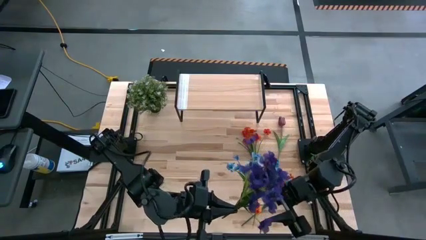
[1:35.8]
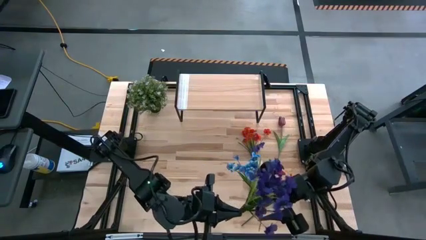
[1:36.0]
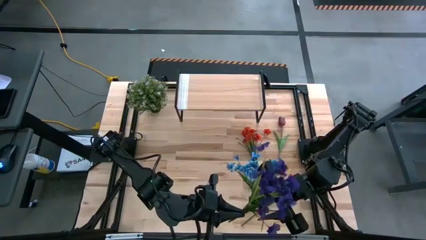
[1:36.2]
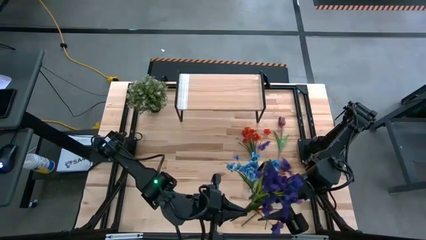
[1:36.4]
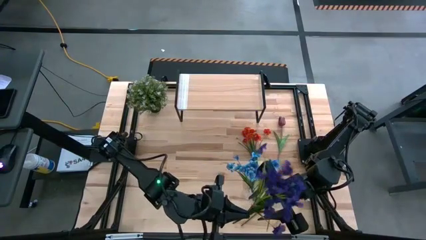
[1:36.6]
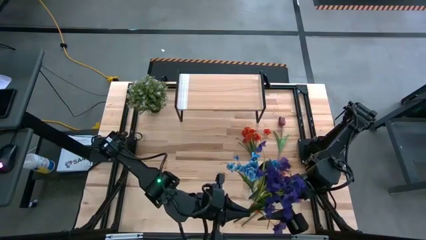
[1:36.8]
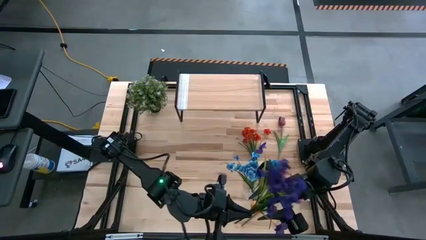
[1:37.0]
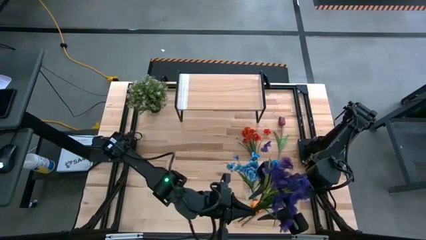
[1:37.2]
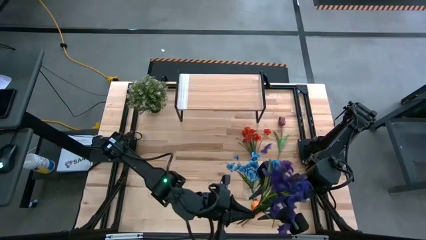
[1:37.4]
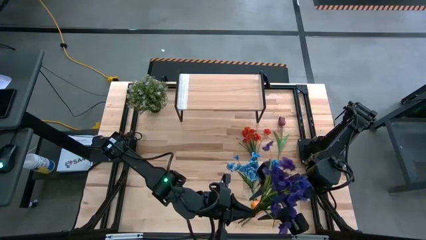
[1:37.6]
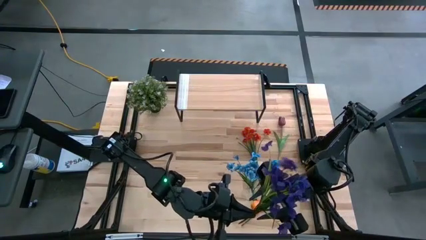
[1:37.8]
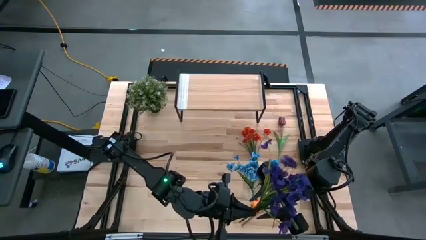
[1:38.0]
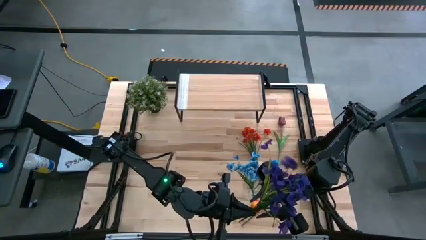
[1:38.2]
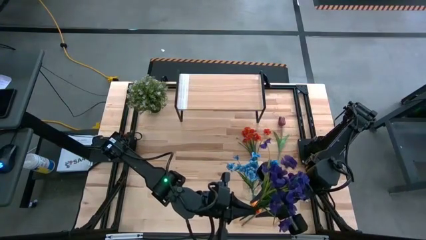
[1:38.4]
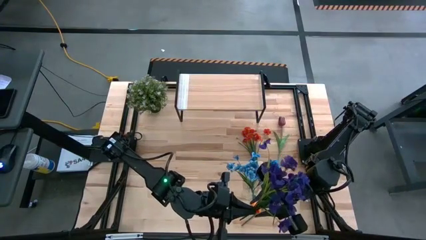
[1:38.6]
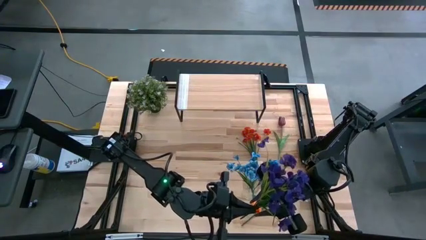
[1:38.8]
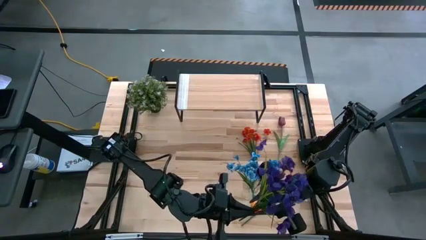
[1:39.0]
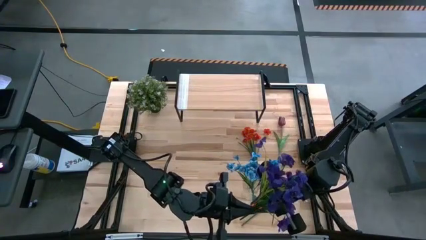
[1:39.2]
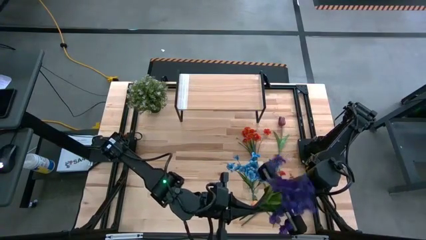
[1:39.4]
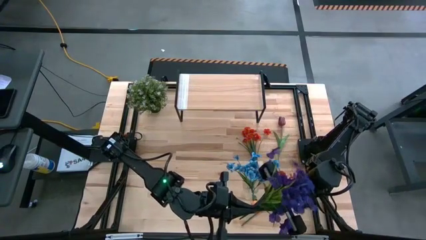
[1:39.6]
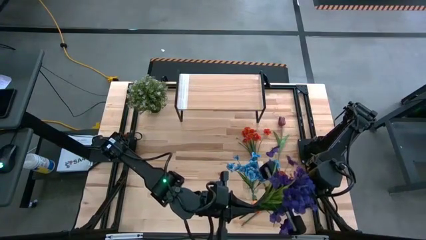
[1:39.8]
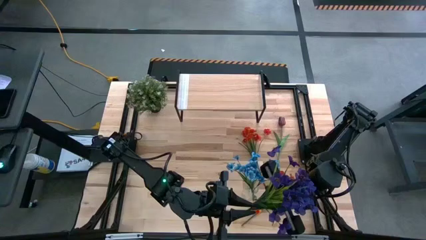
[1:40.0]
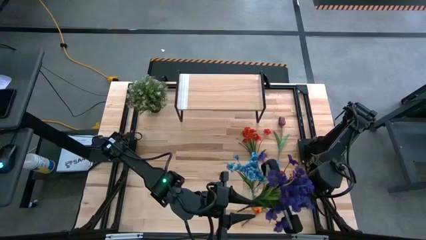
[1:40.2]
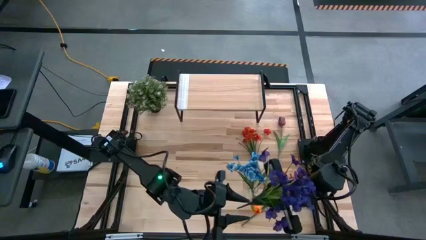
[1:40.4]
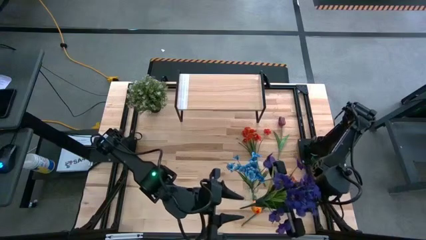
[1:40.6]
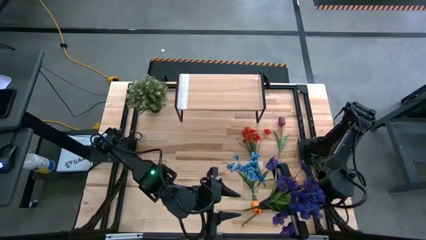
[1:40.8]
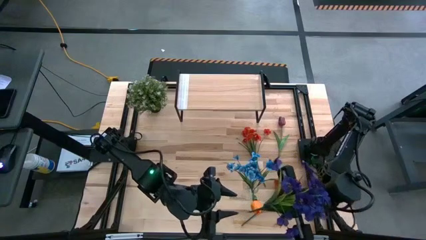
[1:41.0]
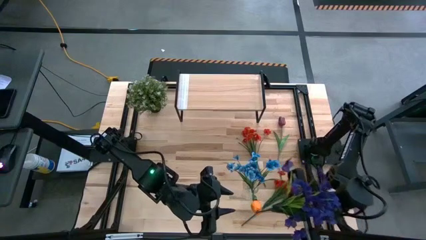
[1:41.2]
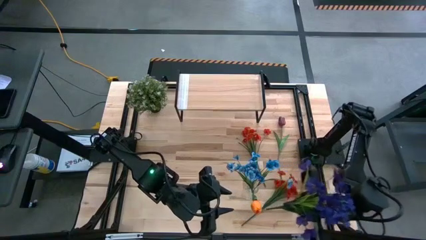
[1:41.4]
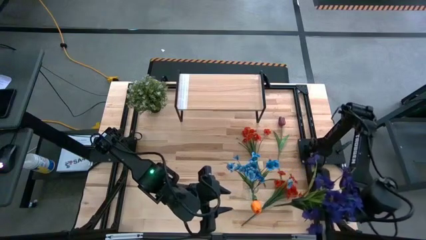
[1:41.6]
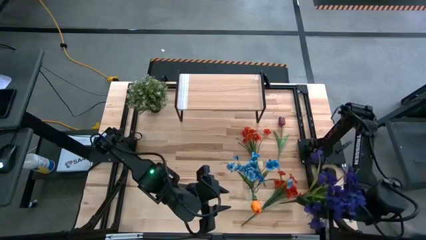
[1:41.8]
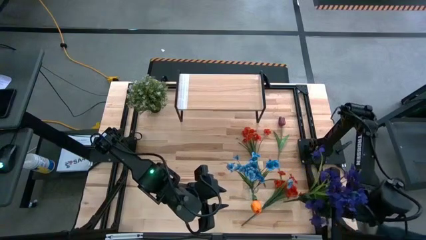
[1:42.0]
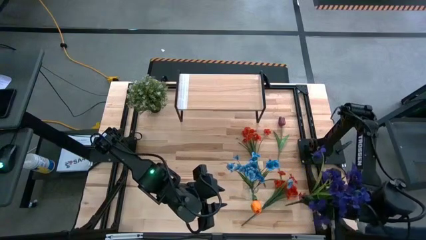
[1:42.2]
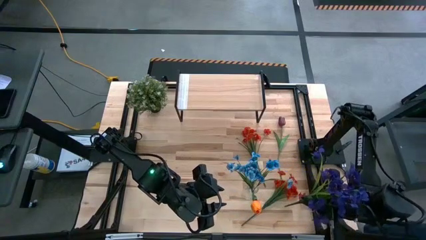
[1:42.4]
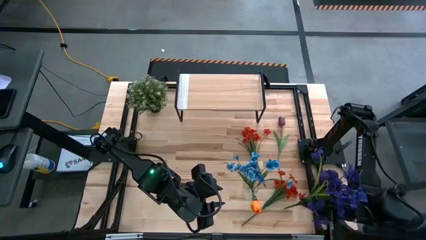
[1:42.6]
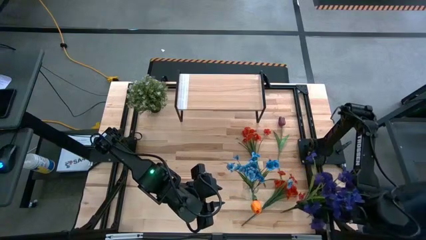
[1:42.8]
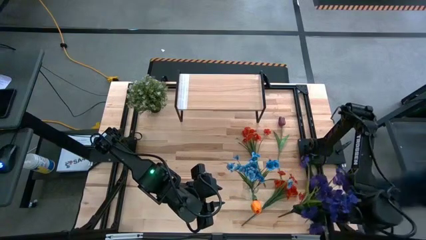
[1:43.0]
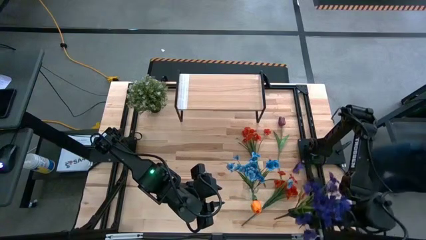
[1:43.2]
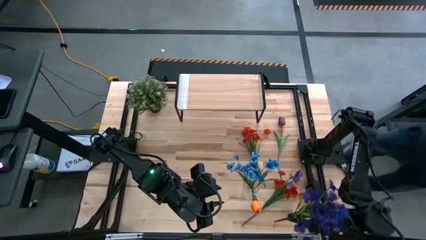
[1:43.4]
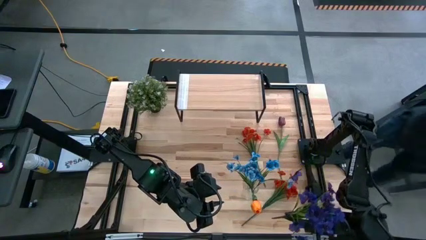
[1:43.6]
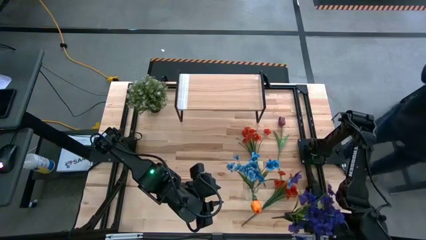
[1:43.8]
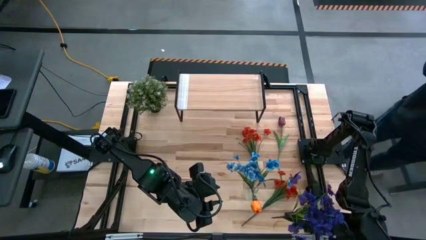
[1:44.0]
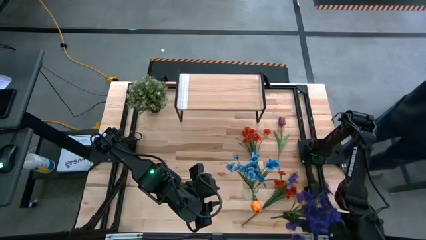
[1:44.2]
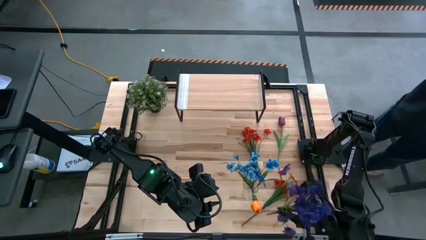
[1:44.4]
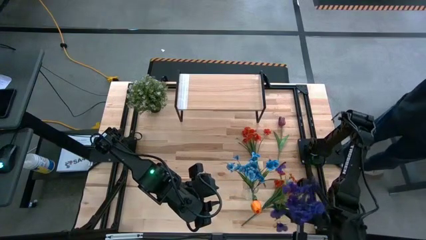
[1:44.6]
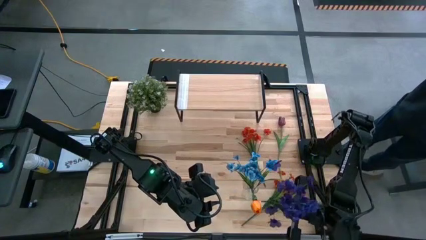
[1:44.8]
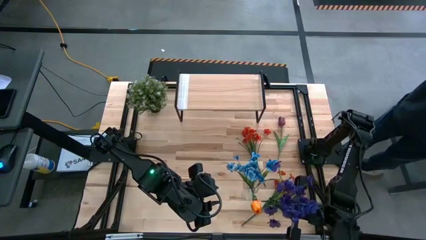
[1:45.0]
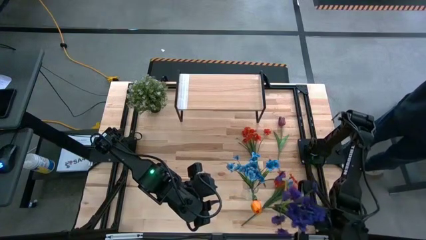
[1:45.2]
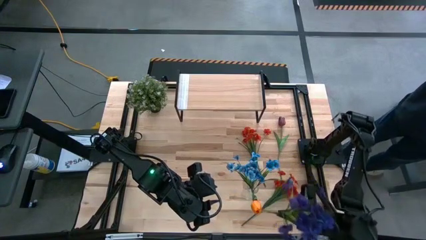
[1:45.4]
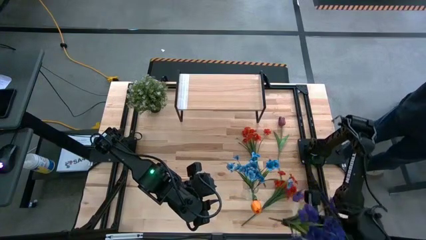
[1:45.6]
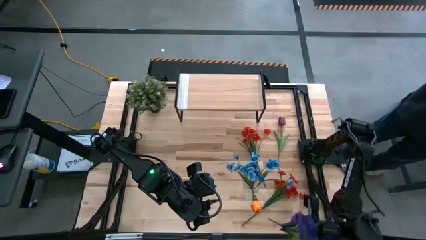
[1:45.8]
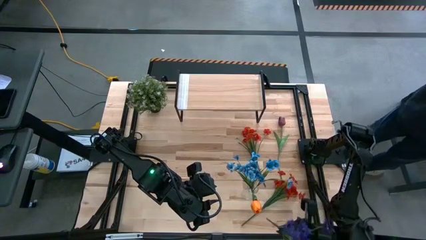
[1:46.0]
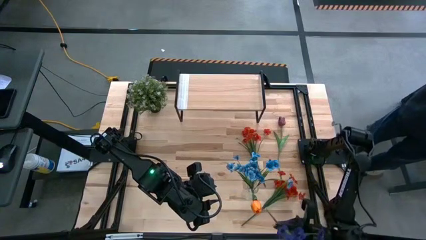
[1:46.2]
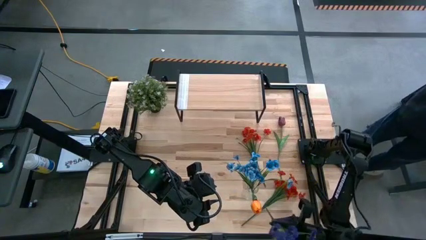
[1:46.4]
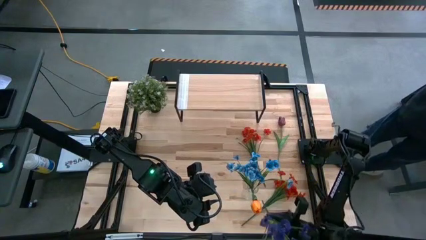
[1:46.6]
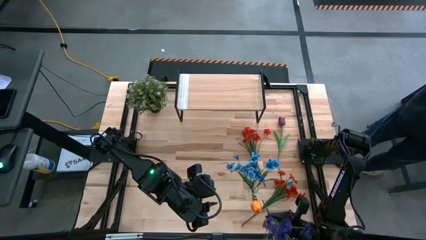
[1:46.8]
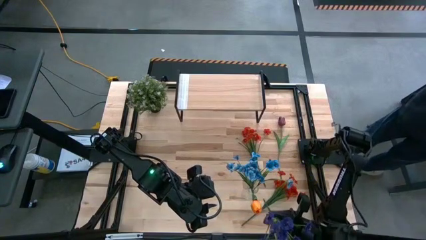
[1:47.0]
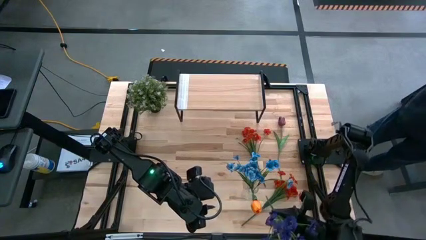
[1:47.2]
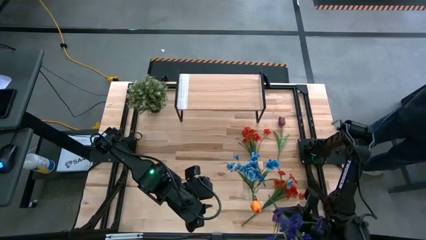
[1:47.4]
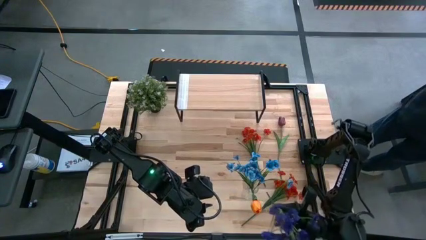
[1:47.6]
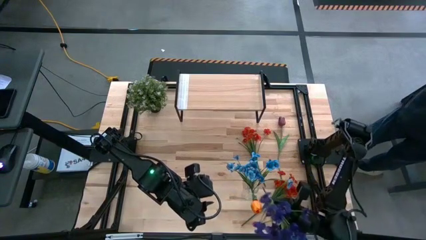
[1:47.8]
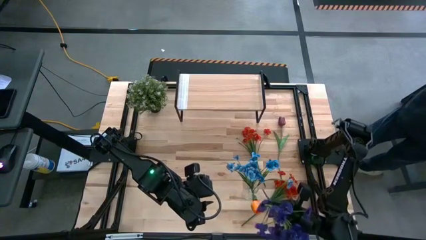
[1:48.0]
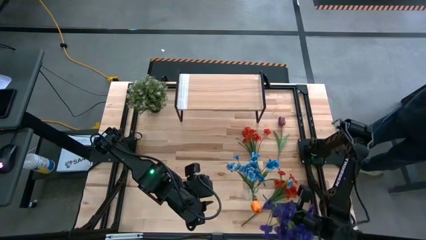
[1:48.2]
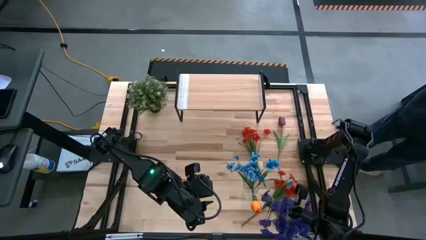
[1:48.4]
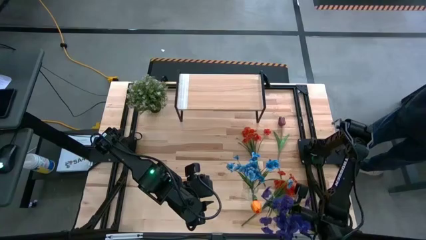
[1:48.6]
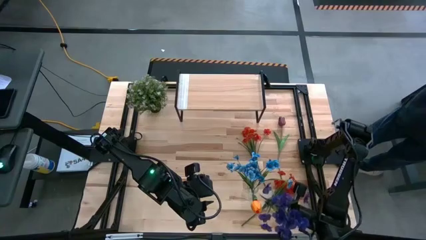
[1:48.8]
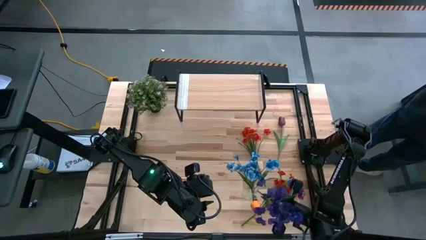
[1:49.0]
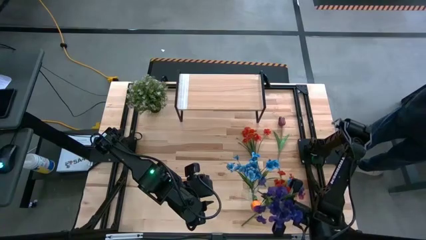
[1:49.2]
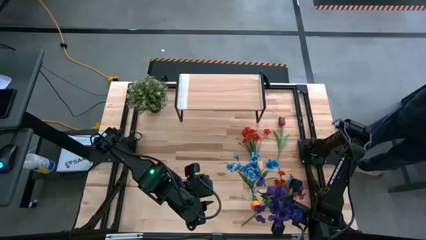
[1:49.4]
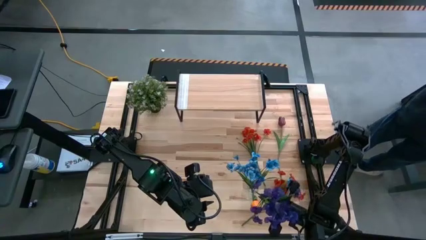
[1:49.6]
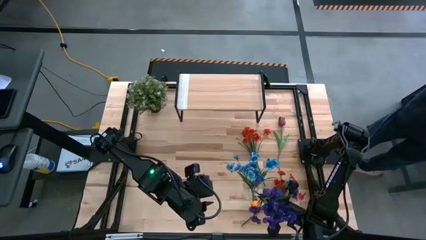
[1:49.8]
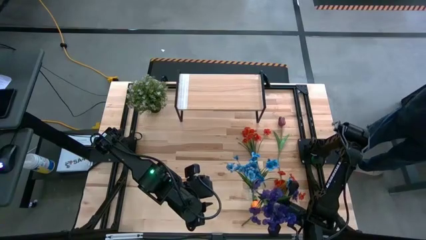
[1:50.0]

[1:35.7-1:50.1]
Task: Pick and place flowers into a vace then onto a shelf
Put the violet flowers into the right transparent vase
